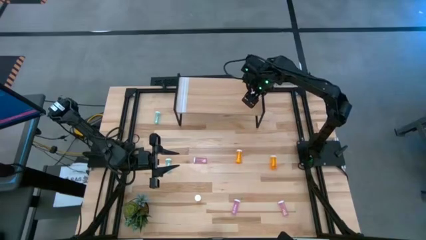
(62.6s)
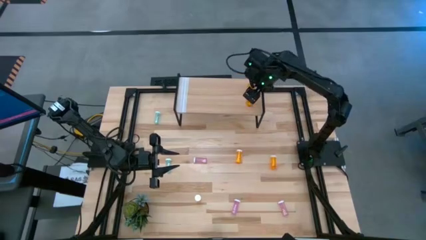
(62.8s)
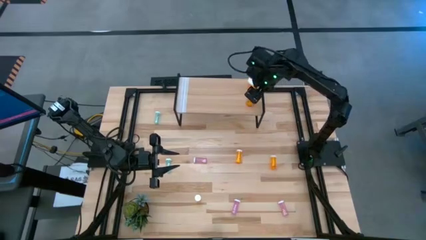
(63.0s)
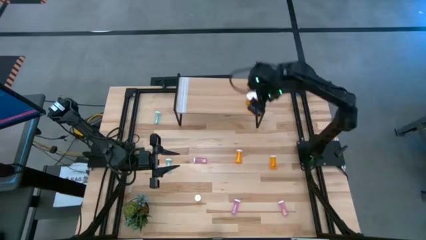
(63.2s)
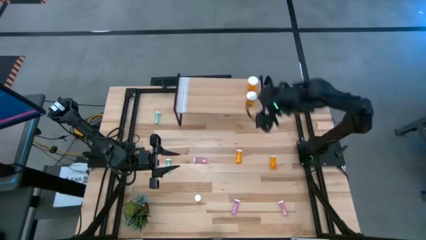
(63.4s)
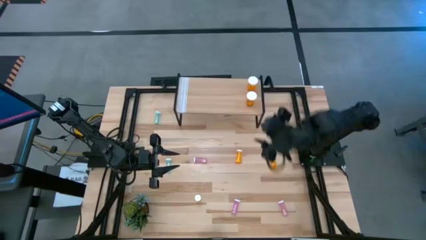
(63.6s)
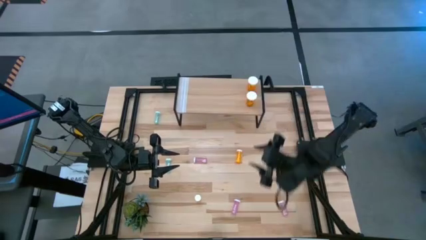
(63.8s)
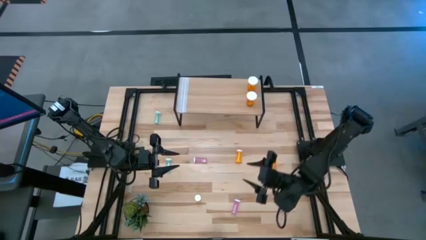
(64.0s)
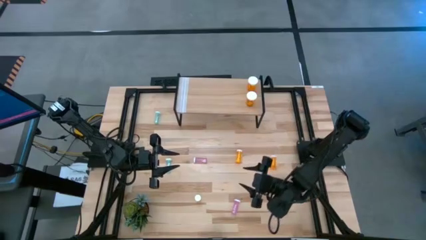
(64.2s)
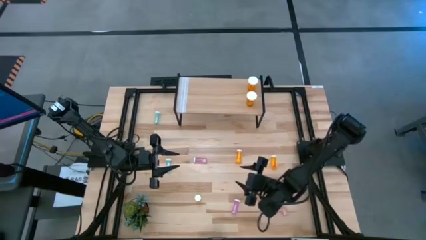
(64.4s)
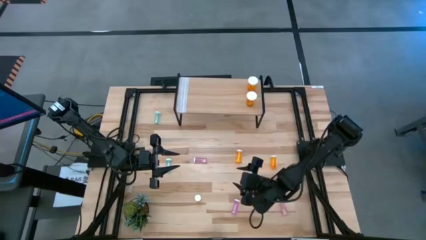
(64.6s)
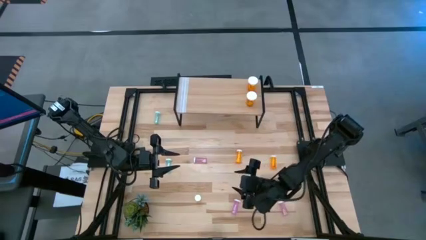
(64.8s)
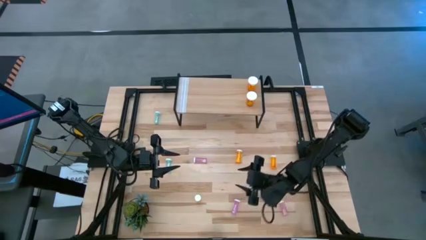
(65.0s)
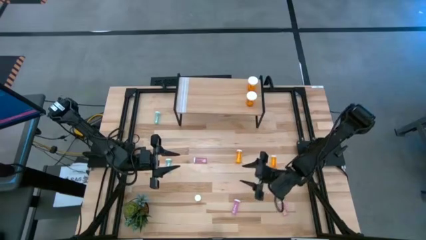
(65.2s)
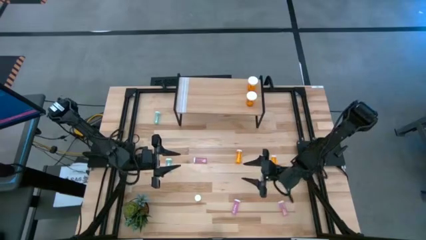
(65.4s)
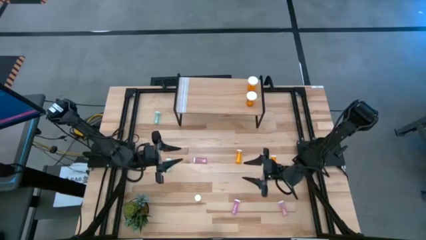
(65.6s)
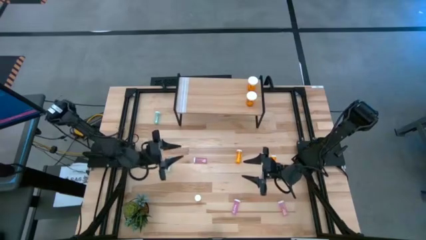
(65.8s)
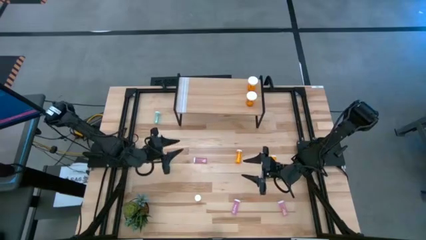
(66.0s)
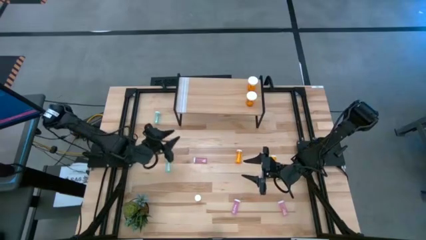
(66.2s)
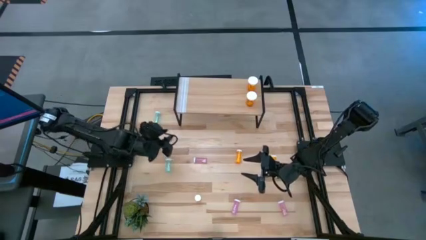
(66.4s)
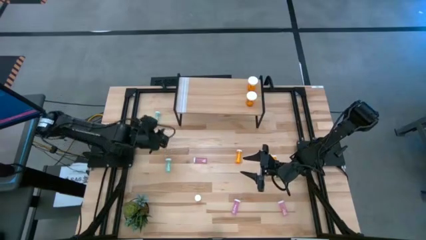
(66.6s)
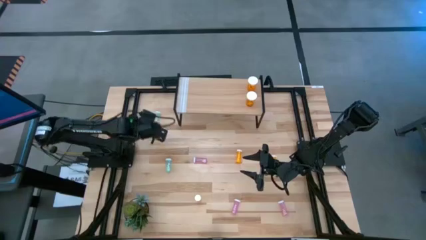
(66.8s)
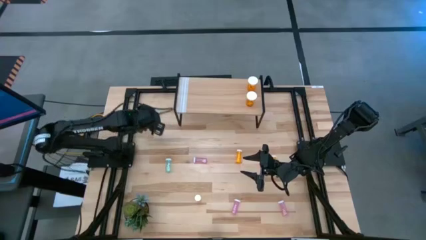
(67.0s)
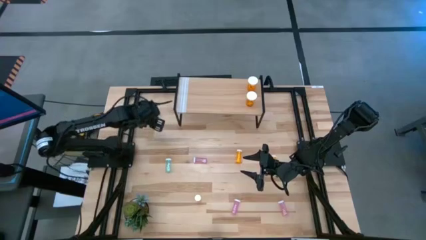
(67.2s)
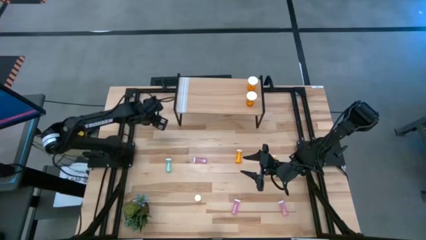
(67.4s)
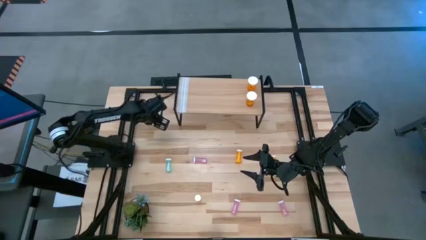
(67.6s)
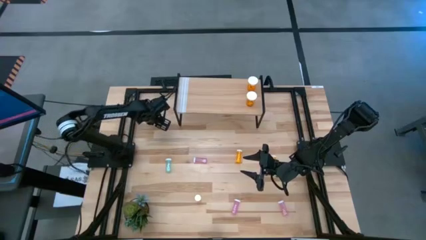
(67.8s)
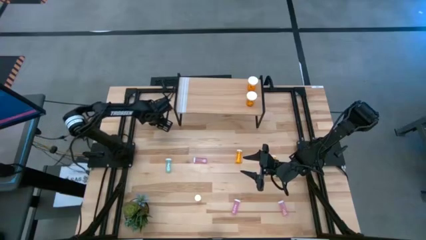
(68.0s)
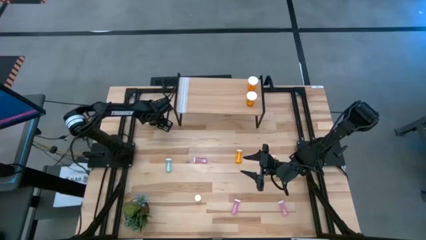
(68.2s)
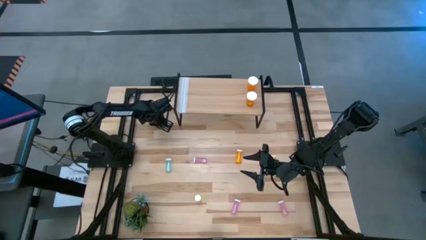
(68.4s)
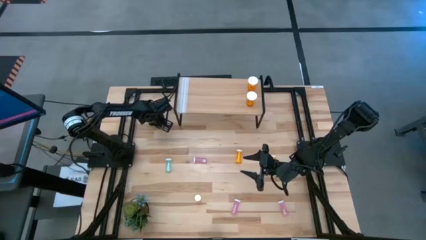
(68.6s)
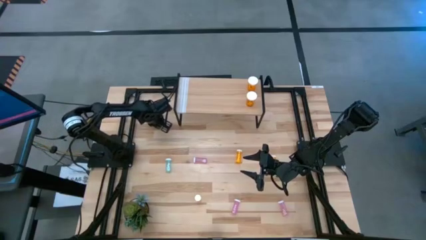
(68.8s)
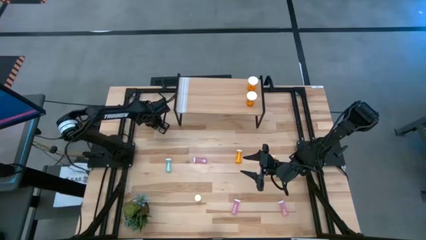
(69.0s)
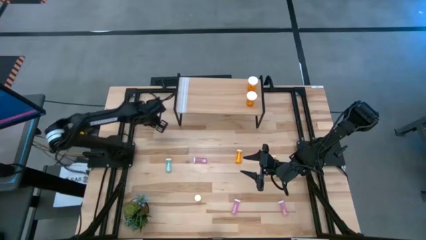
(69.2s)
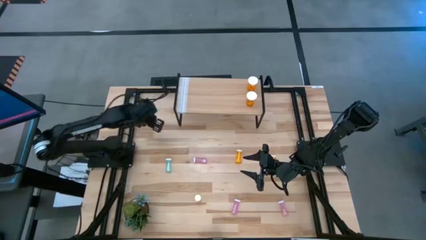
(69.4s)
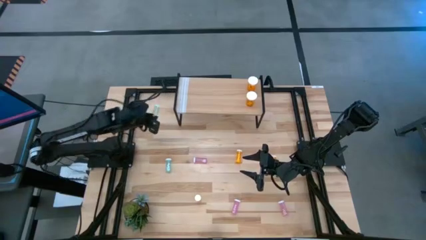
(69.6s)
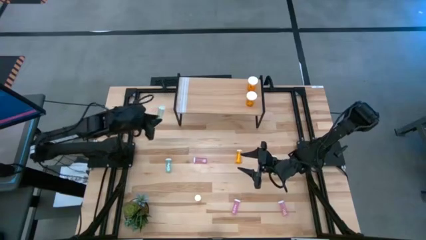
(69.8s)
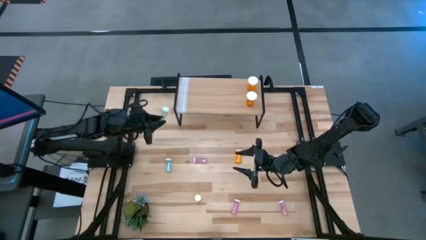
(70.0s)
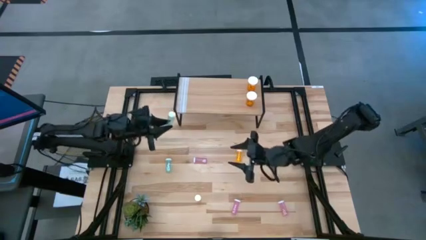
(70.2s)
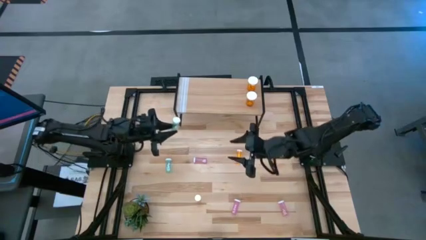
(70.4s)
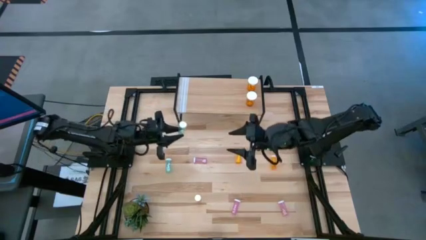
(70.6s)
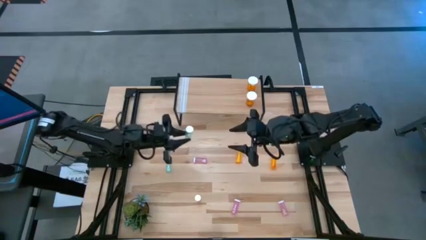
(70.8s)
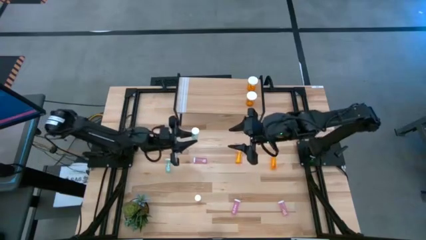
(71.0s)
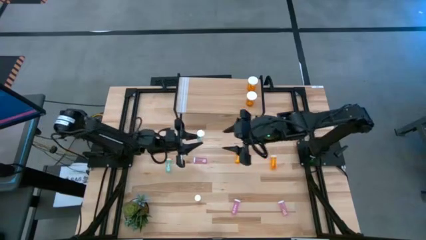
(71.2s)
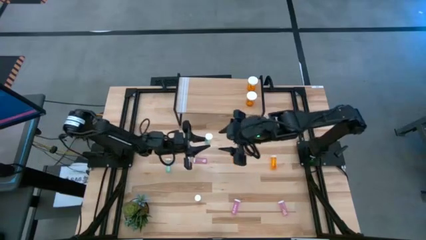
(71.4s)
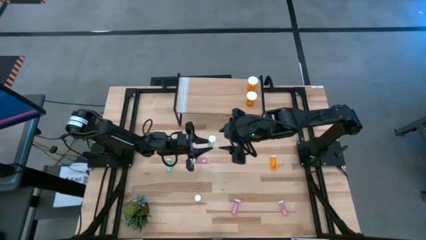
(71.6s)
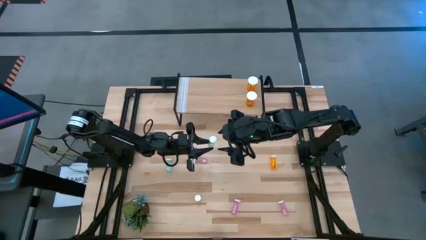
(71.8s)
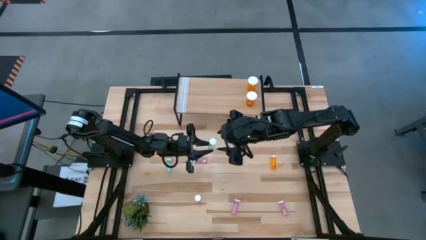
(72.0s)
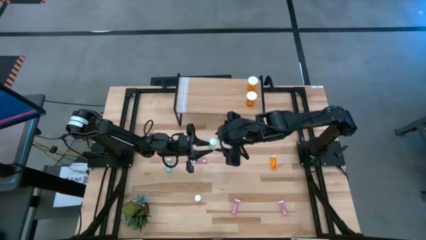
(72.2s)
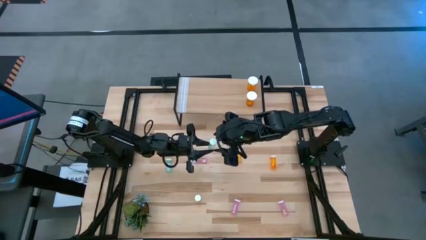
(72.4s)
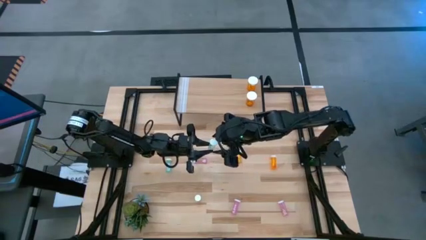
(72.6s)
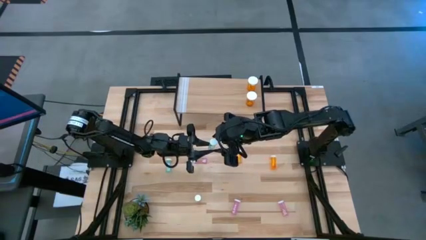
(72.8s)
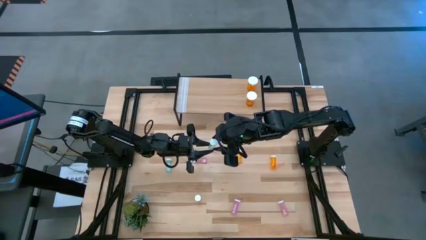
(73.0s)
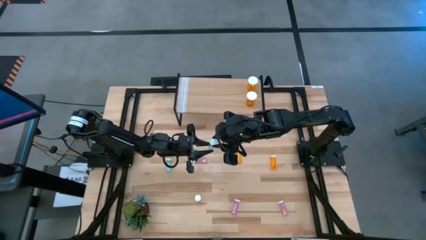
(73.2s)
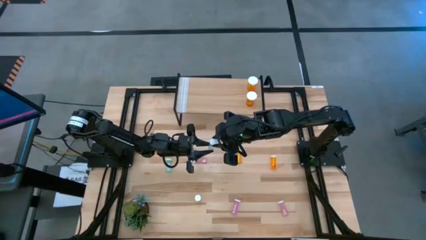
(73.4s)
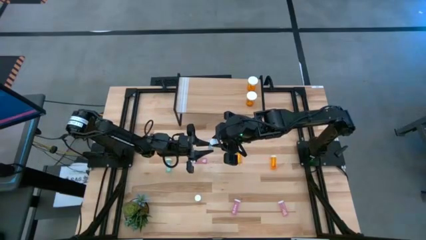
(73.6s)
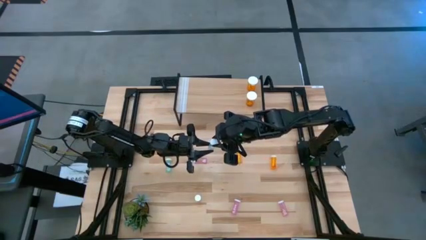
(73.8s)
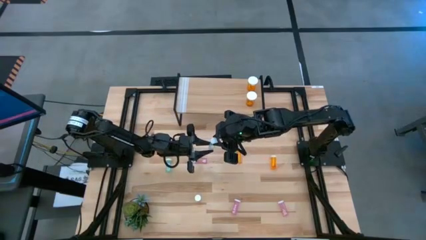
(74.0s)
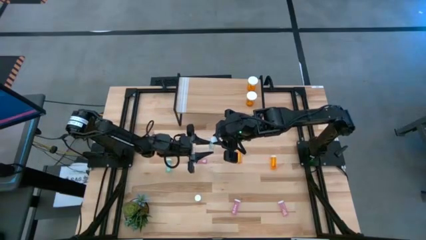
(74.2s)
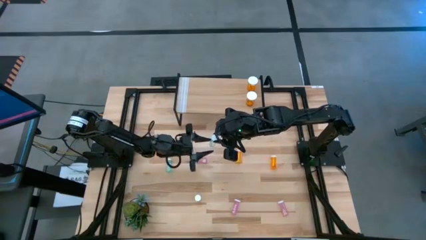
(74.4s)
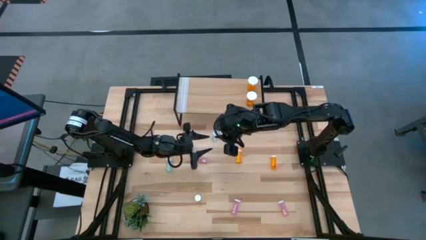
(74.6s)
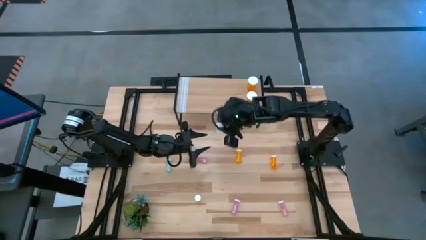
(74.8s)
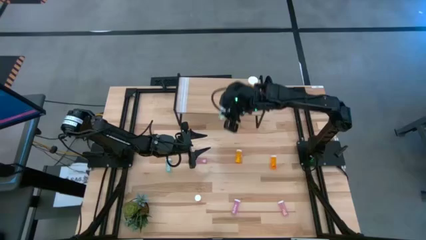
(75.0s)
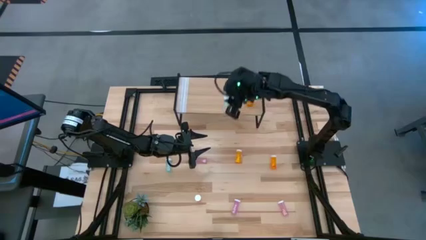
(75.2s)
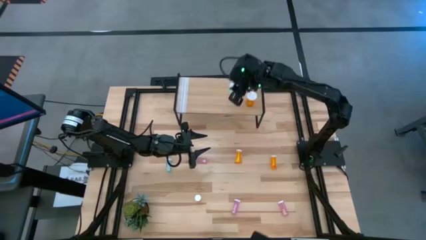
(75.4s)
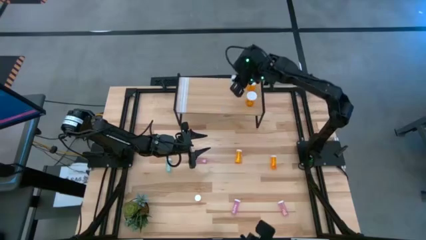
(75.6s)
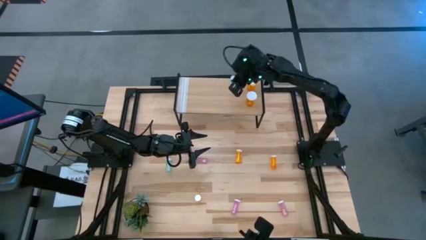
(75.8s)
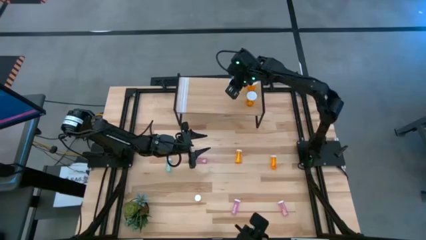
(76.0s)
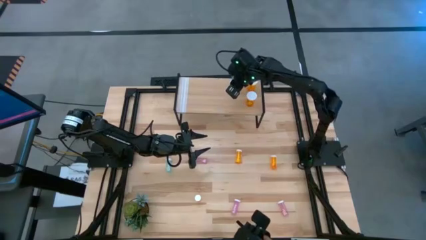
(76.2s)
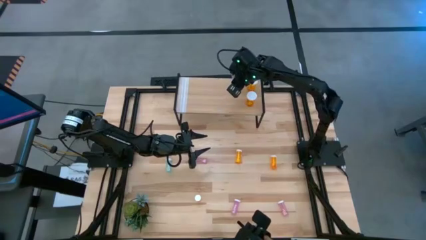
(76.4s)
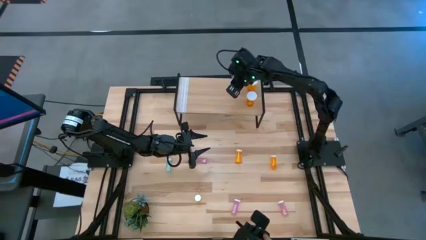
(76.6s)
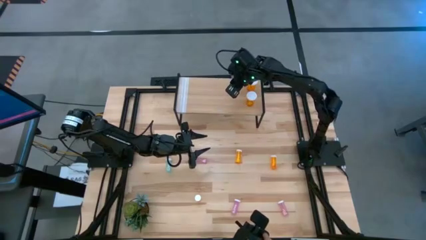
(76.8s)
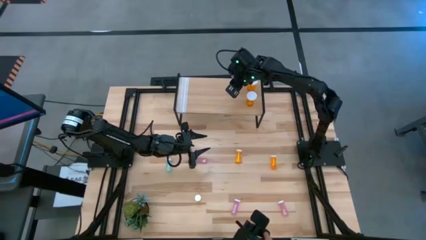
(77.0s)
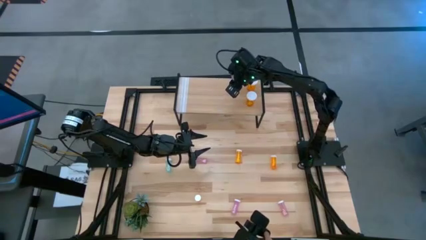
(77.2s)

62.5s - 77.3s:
Task: Pick and place medicine bottles onto shelf by color
Put the top small green pill bottle on the shelf
